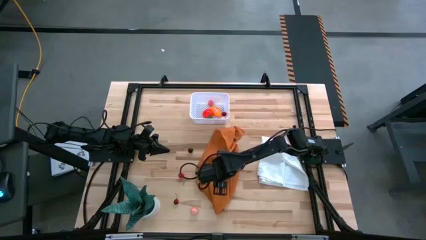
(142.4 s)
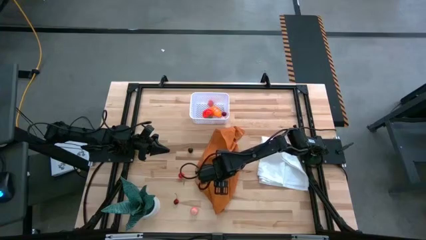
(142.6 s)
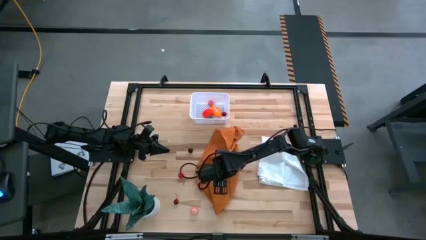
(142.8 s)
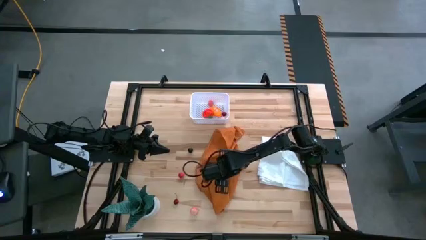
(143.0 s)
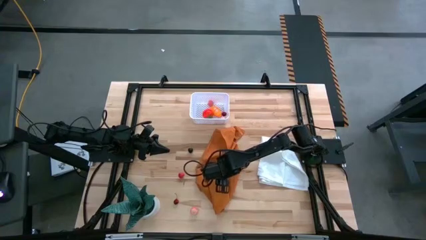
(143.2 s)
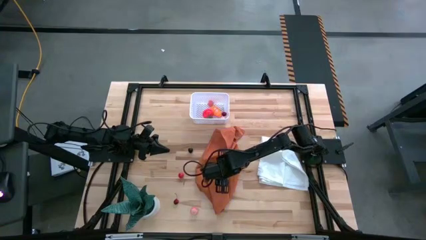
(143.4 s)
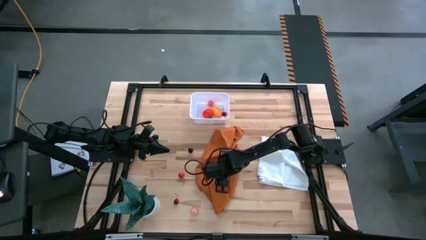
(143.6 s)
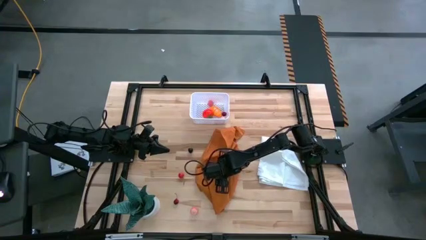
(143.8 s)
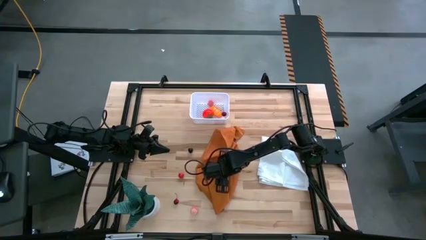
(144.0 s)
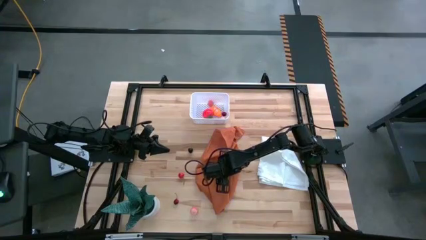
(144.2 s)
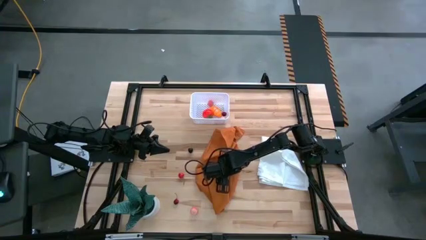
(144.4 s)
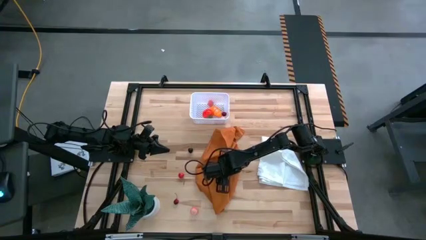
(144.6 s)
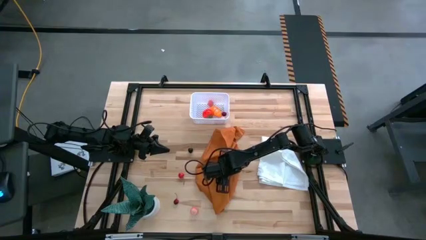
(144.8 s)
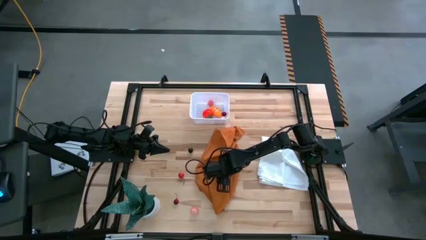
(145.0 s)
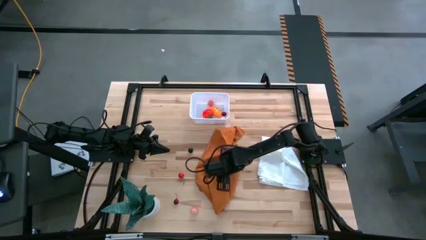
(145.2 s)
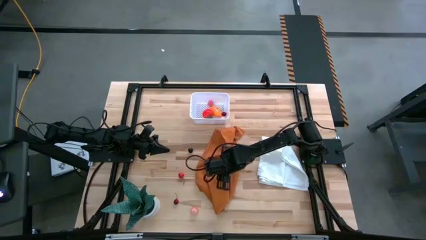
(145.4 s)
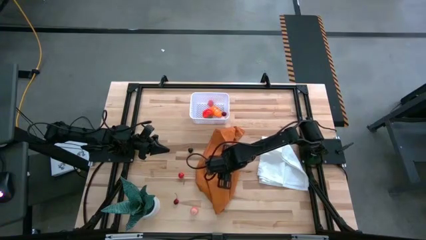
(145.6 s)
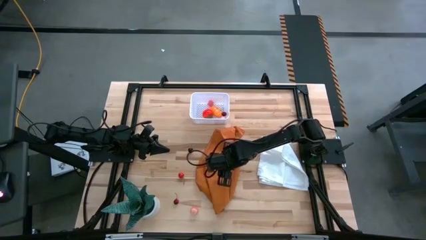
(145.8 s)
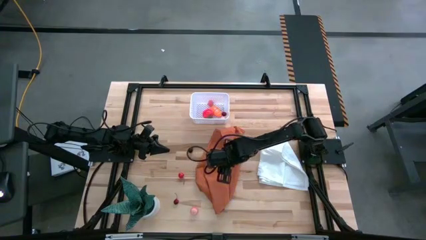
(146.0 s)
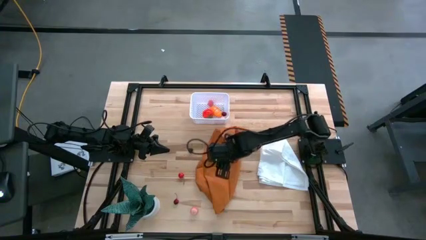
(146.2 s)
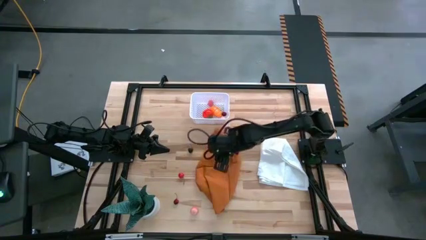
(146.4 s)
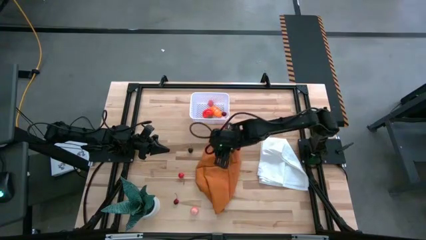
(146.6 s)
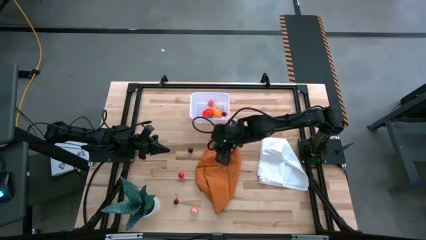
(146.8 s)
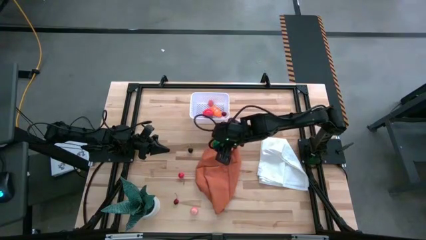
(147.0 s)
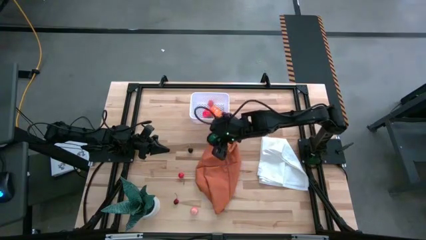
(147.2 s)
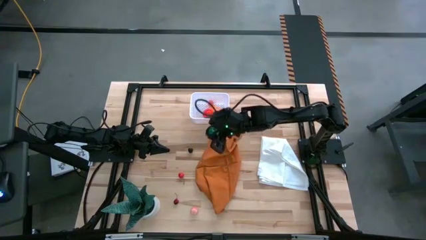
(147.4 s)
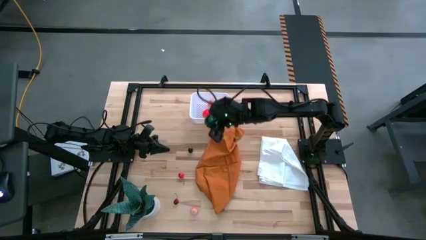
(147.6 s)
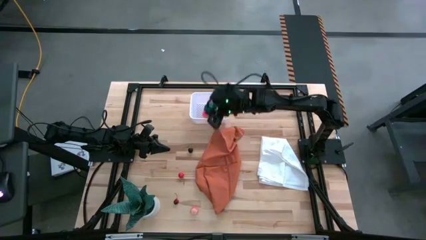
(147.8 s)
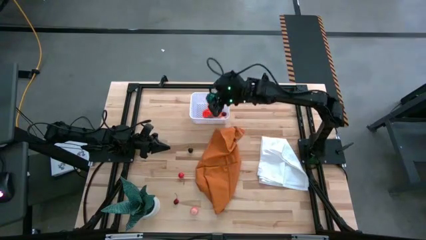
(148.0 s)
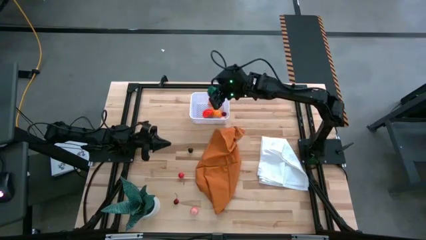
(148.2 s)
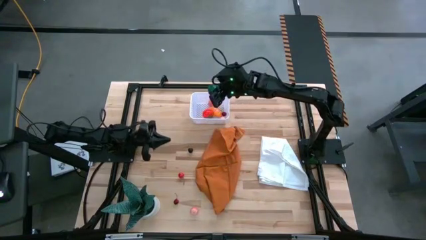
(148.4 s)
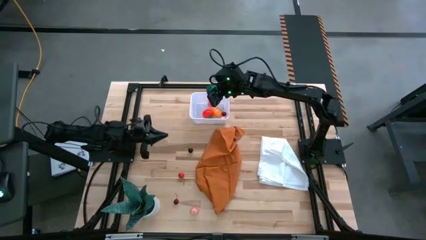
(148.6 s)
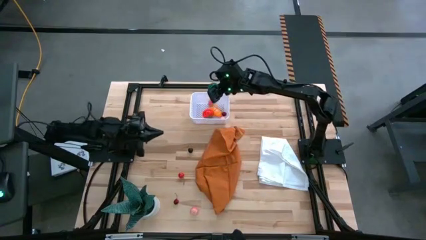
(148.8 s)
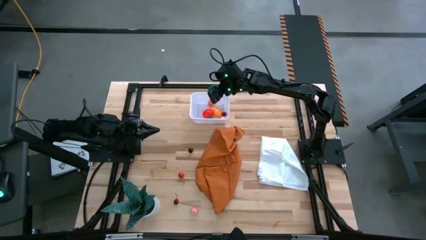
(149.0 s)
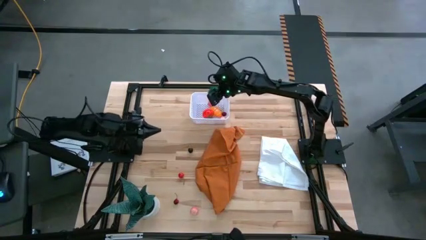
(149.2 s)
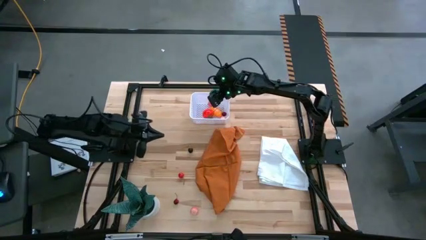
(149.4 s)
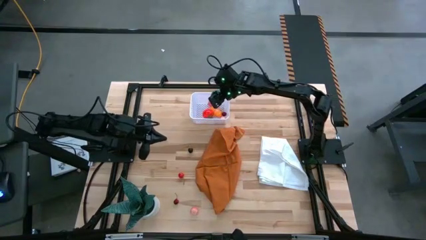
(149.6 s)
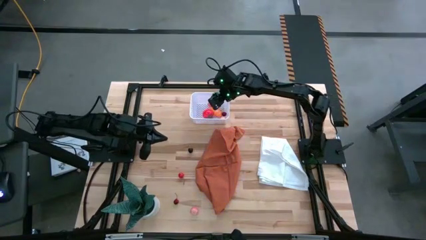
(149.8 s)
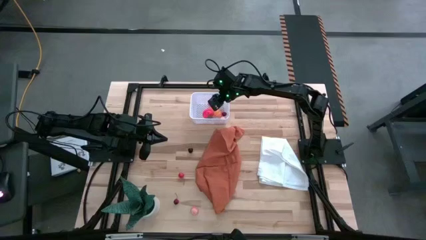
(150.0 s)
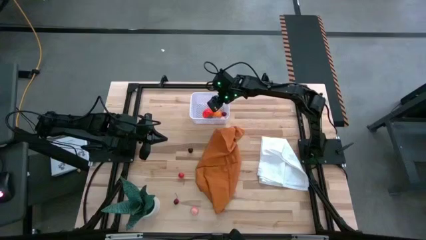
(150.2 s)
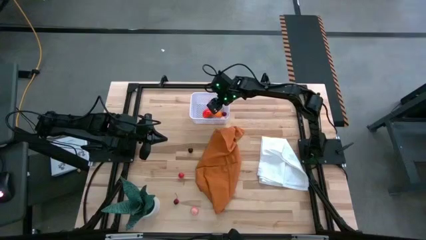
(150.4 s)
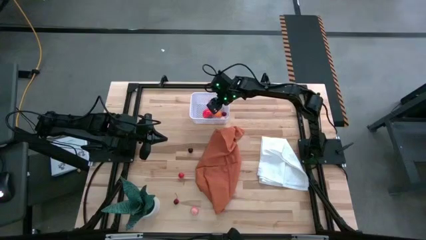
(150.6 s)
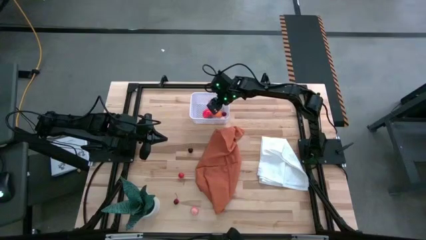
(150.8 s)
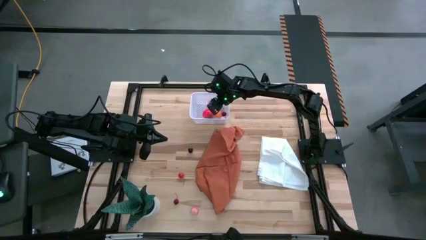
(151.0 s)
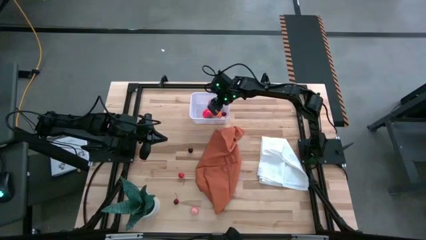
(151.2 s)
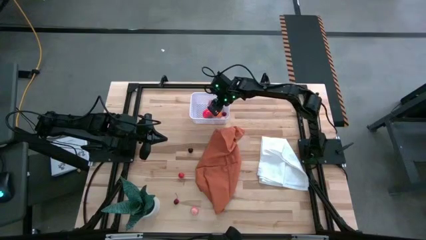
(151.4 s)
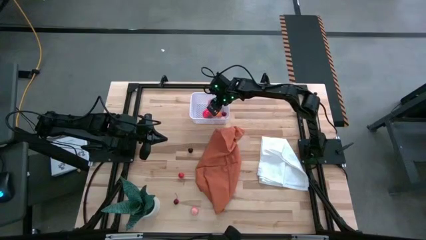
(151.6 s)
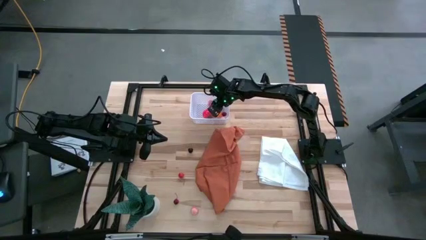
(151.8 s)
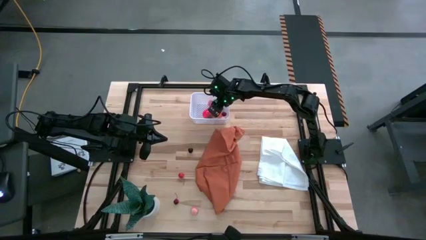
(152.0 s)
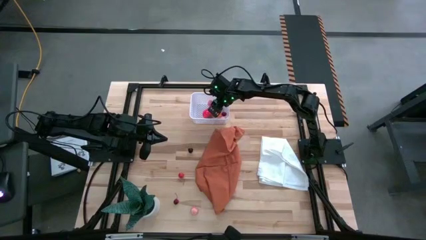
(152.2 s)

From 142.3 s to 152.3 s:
Task: Pick and placing Produce into tupperware
Put the green bell pepper into the white basket
